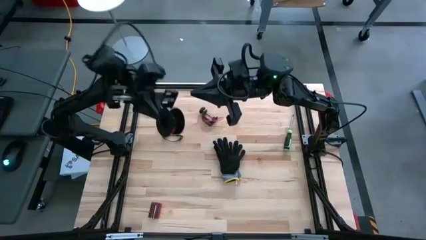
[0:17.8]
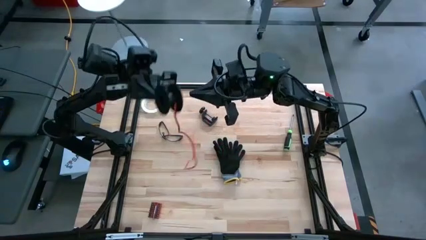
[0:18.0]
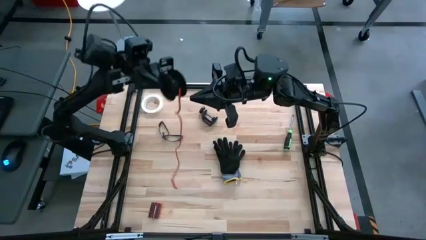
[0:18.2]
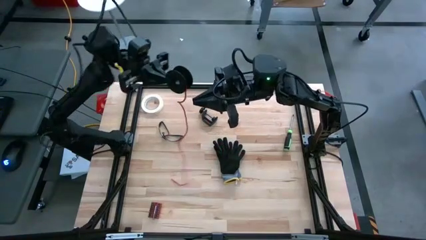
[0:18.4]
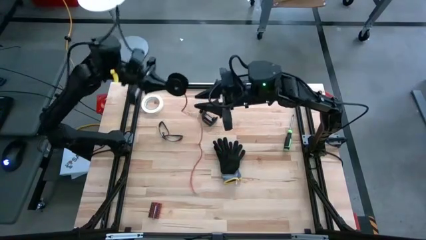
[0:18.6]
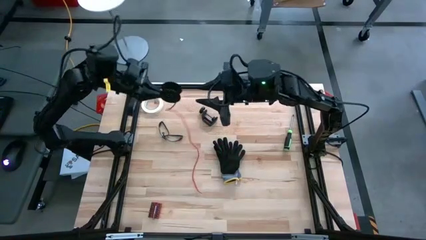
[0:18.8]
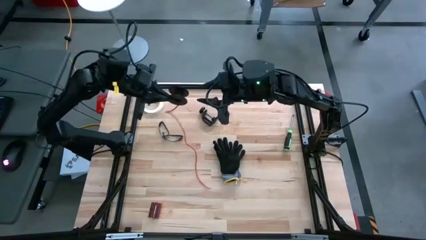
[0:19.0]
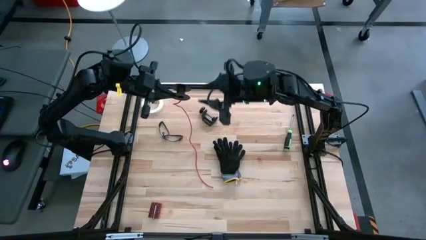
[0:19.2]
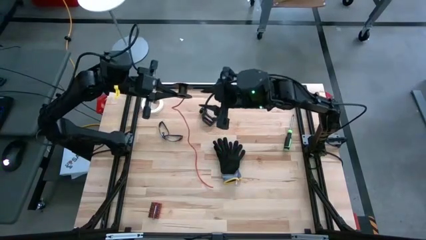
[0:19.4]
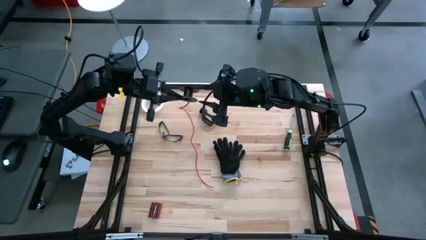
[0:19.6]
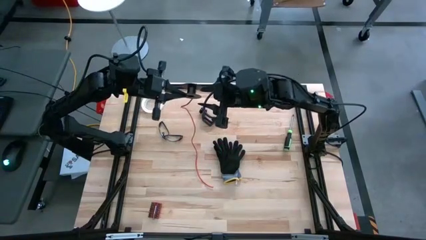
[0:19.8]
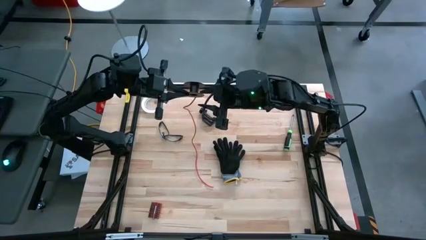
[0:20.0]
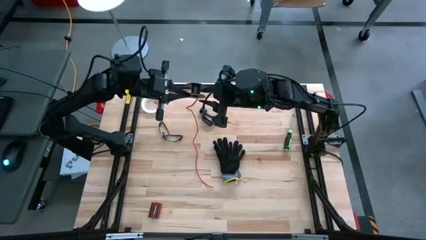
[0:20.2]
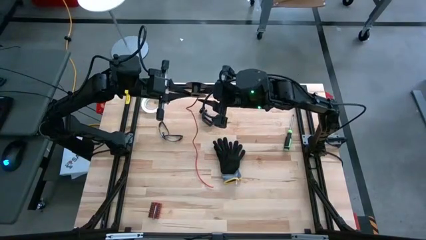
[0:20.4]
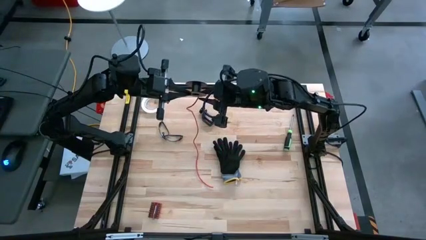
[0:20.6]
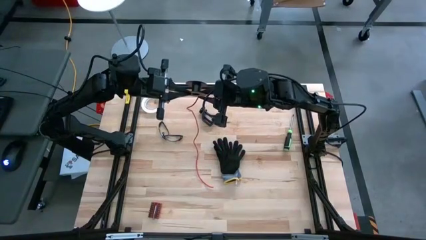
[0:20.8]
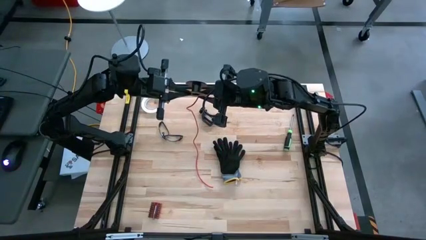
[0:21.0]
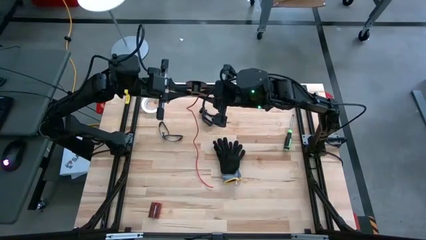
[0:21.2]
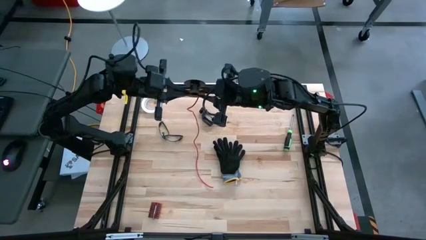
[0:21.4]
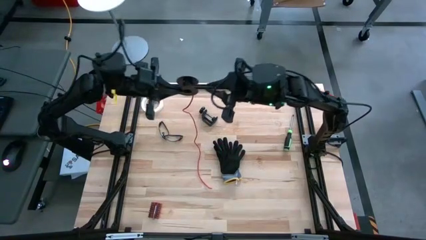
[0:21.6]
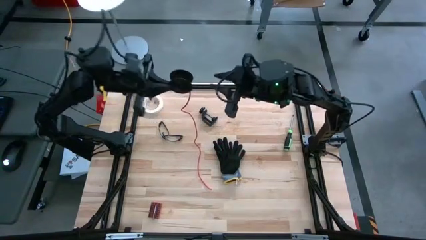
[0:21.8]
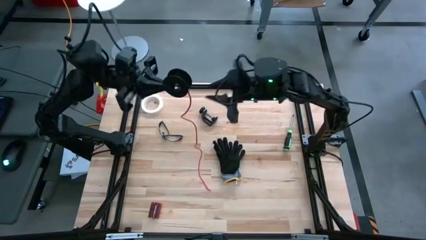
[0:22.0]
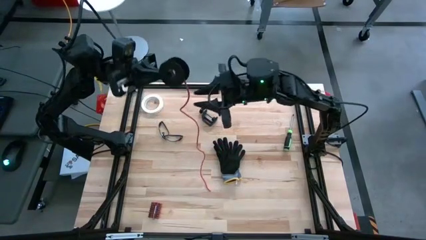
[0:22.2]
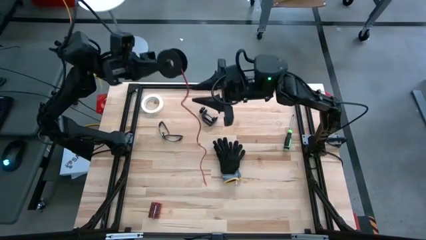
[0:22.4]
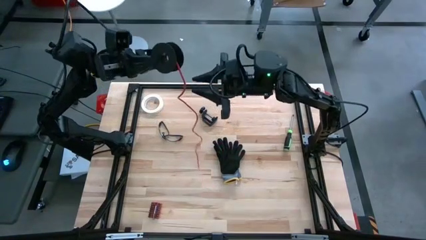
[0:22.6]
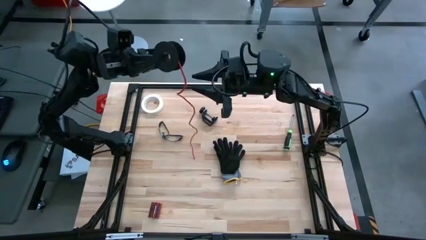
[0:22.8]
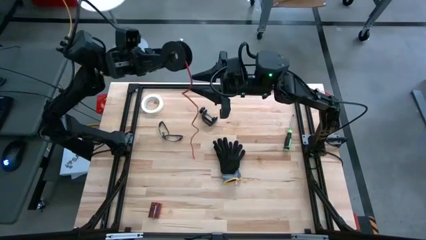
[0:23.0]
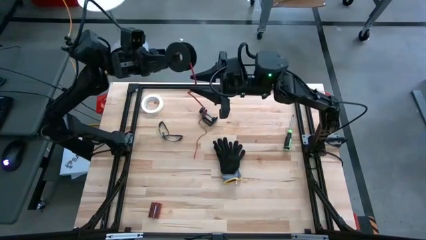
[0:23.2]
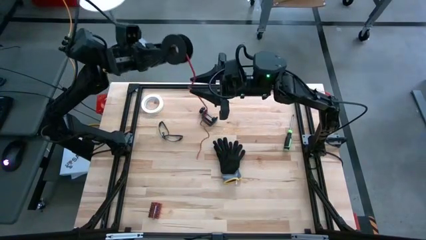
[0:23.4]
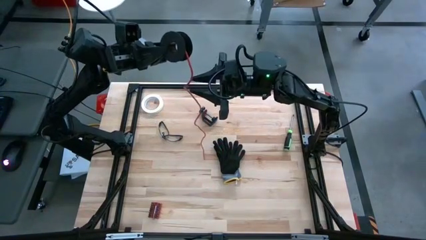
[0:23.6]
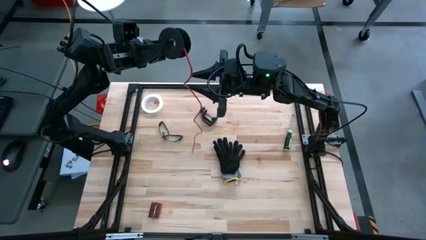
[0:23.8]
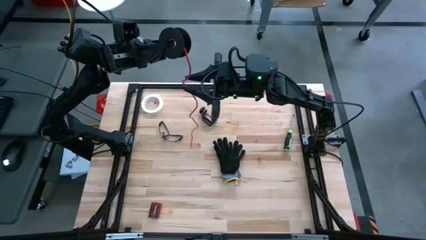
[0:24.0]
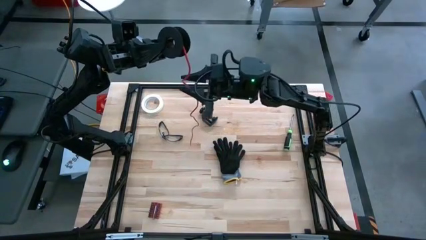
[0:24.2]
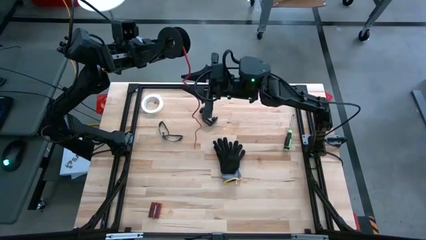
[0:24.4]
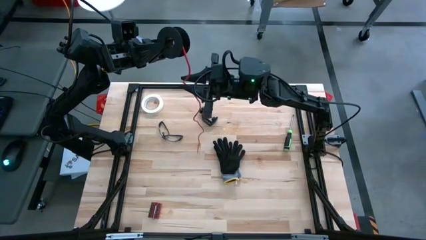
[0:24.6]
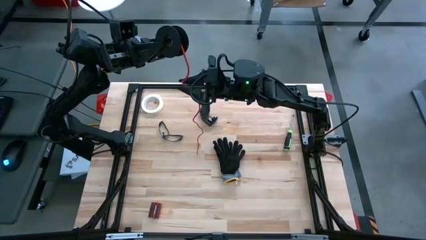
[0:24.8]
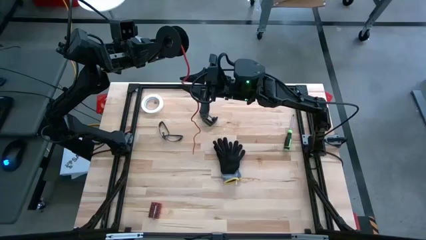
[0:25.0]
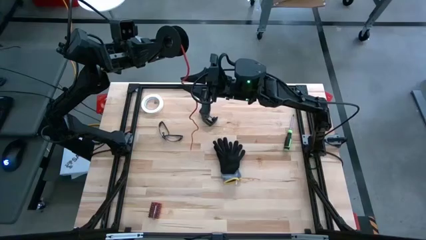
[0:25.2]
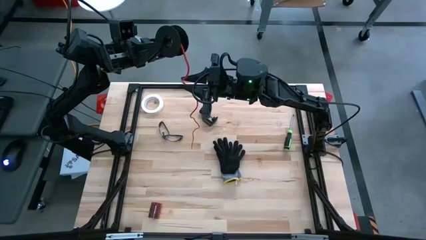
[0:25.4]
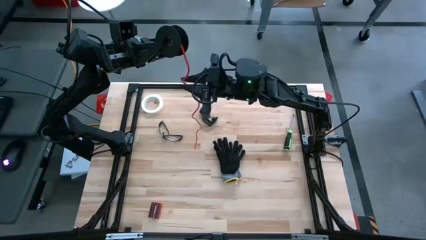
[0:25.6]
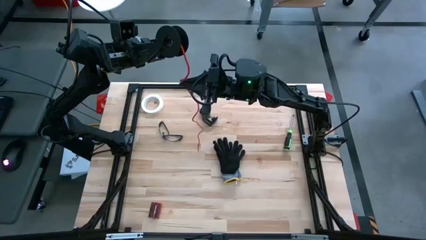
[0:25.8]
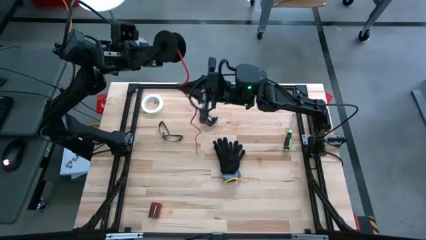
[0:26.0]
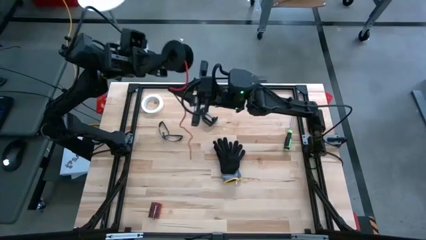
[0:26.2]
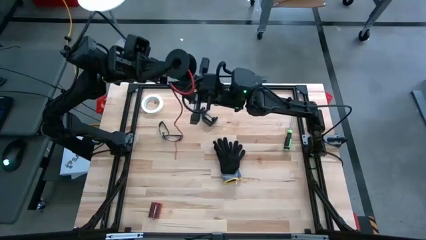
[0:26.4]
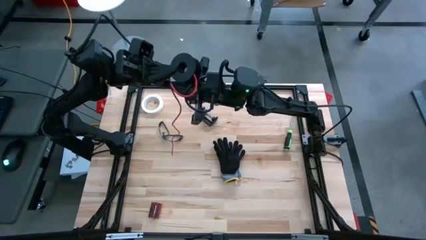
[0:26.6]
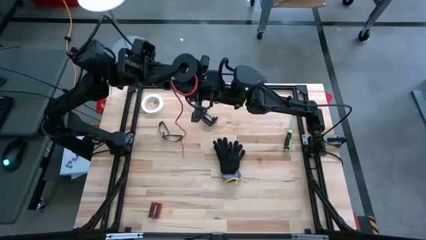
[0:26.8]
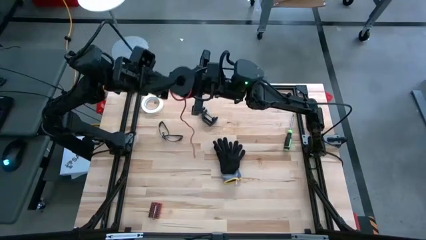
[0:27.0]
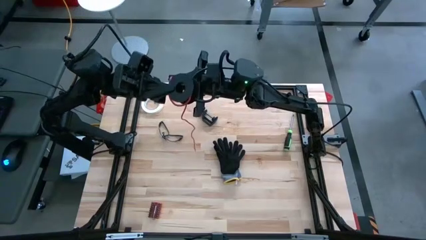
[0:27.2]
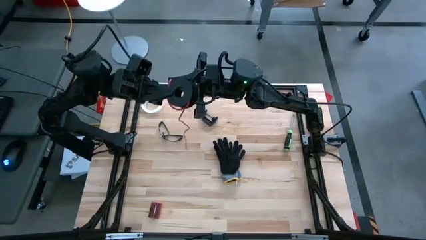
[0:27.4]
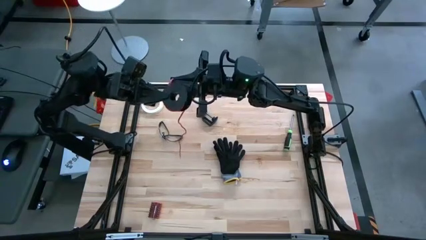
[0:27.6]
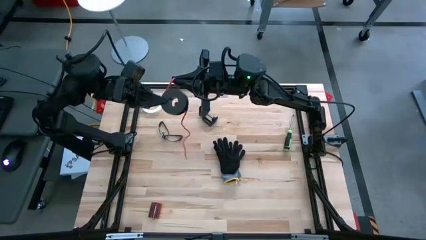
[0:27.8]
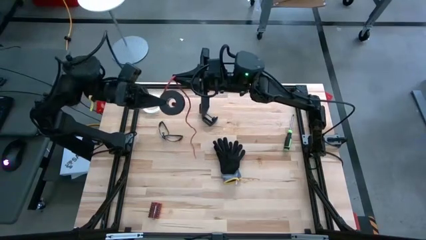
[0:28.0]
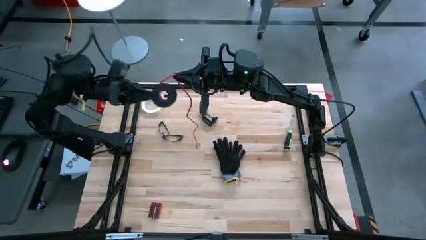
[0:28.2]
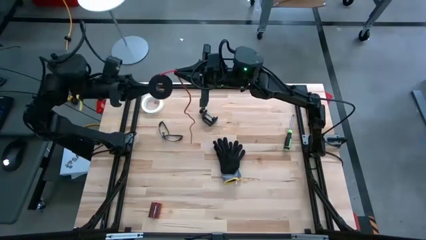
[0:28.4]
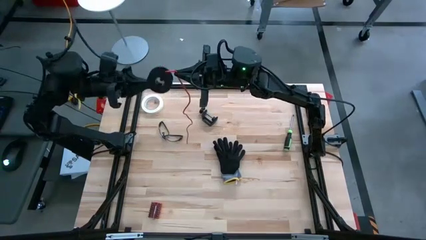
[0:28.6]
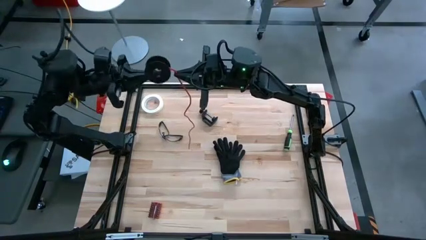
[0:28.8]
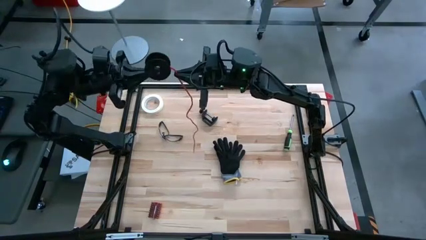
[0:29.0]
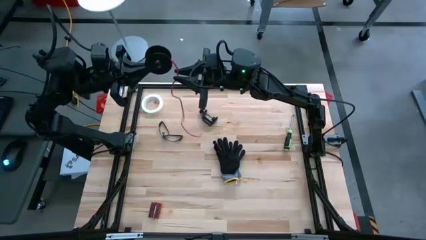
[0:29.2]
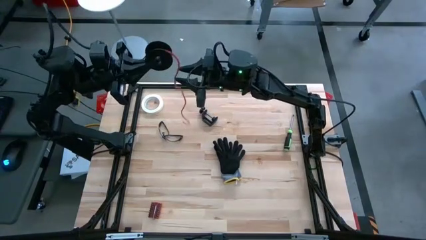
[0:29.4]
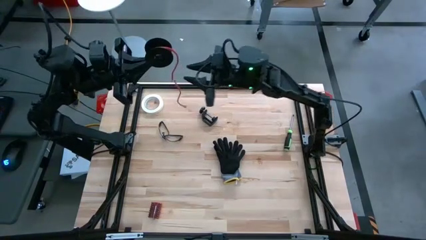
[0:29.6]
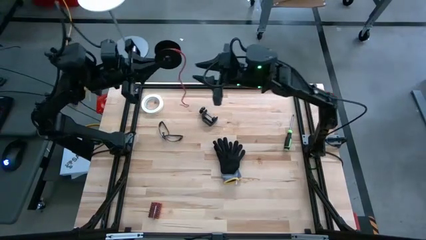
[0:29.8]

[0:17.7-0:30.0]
Task: Coil cords
Coil the orange wire onto the spool

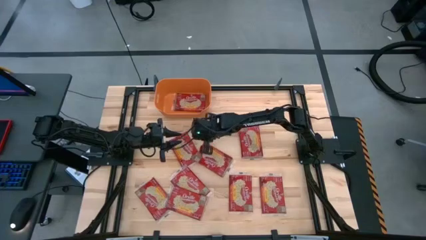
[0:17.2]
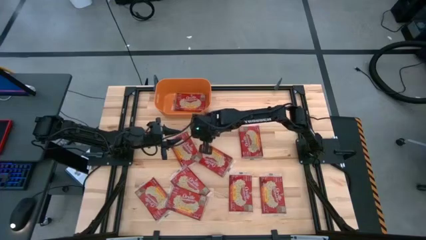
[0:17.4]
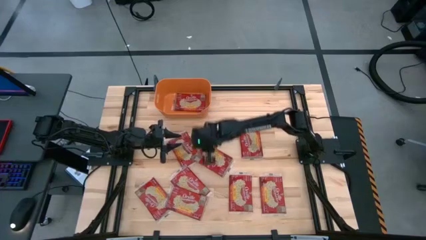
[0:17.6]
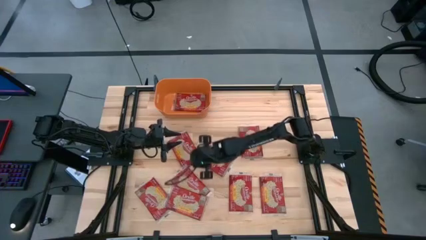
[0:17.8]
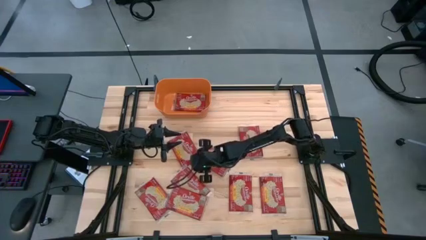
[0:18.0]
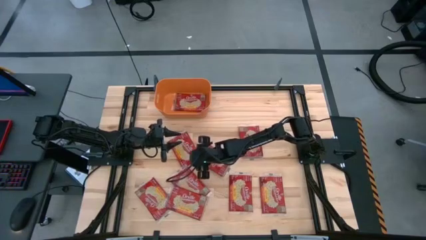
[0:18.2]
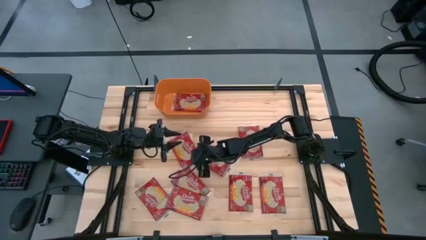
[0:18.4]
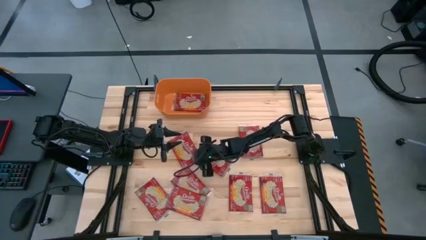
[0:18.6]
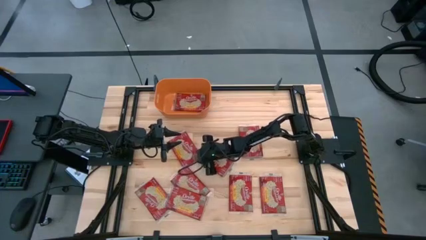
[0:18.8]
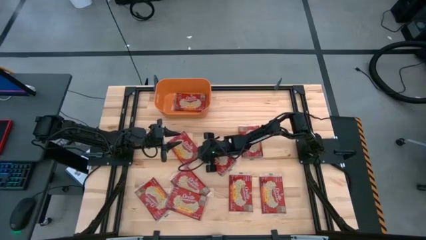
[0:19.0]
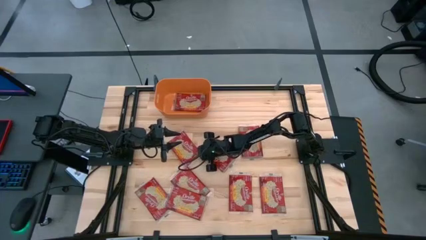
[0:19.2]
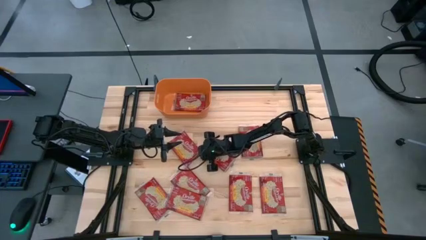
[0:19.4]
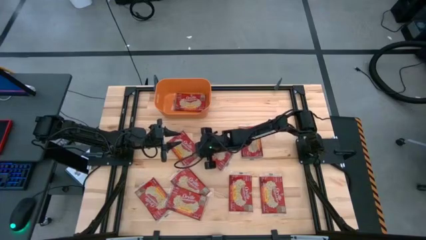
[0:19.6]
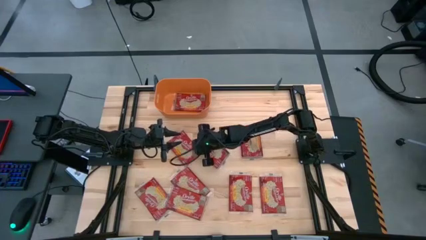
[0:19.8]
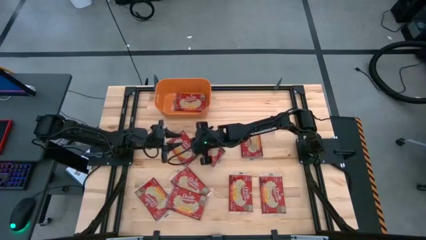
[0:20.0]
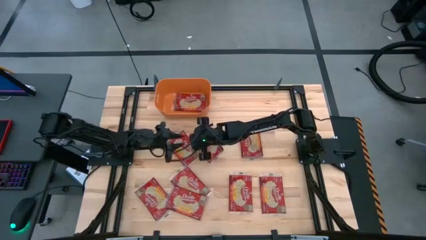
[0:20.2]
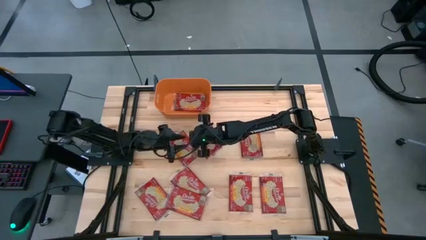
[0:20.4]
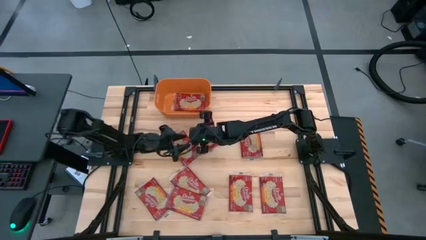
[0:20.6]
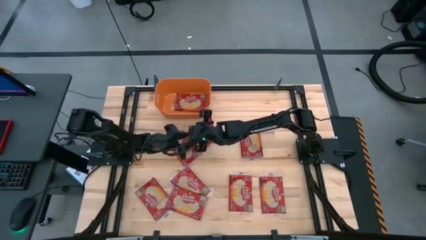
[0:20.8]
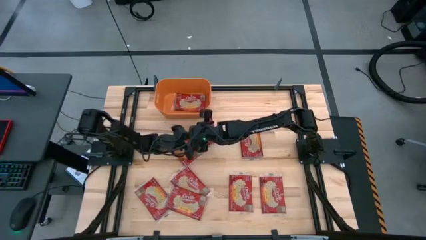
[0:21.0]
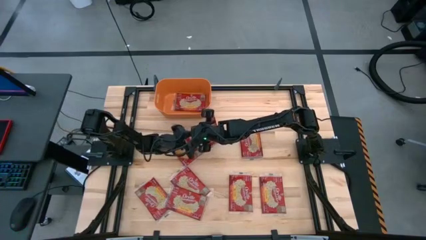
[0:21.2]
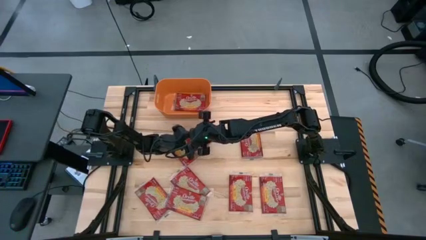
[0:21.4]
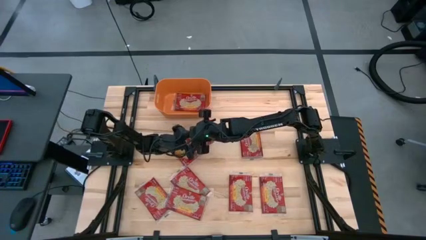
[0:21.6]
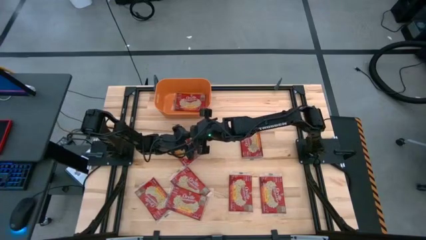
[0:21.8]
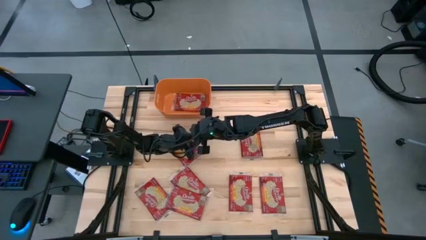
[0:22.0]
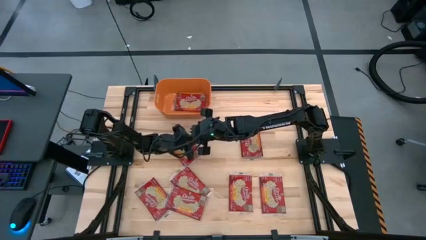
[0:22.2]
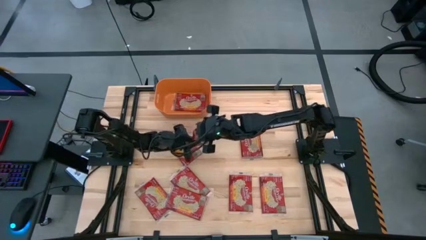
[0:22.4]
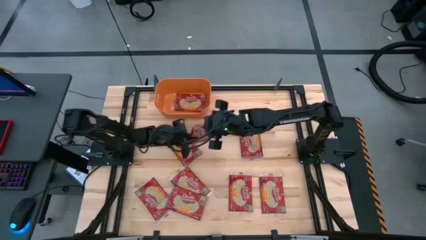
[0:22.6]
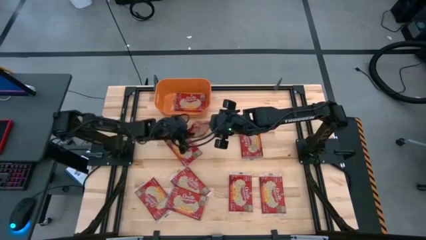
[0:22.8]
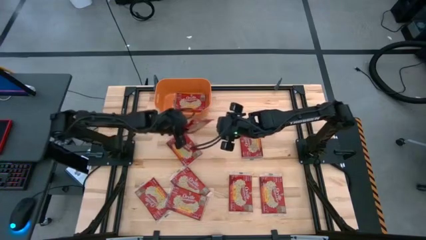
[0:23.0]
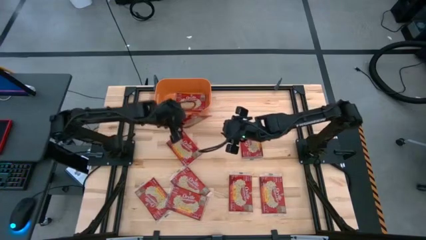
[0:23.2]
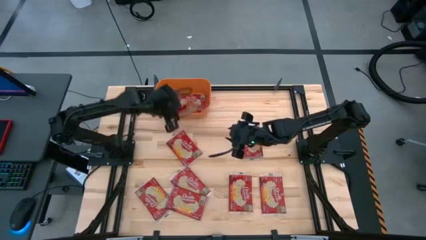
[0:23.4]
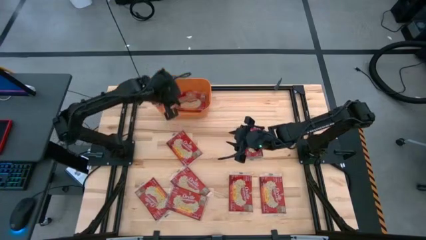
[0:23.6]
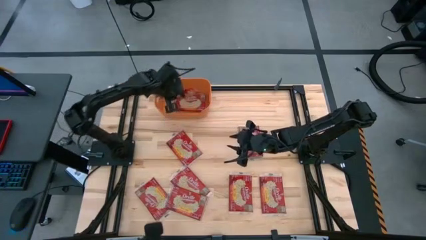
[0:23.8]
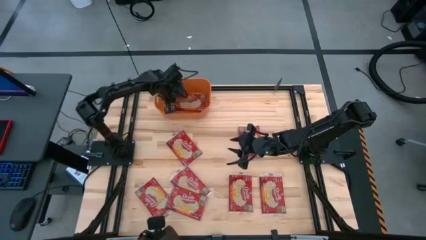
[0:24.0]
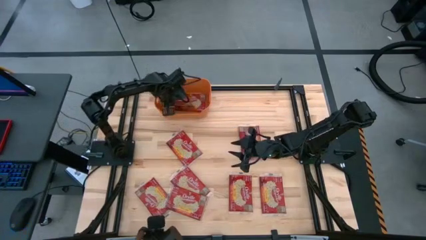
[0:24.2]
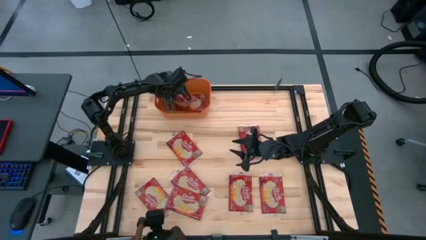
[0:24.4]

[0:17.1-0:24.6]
Task: Sort popcorn bags into baskets
Put the popcorn bag into the orange bin
